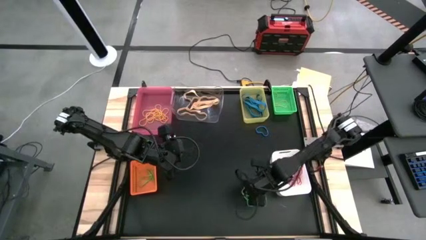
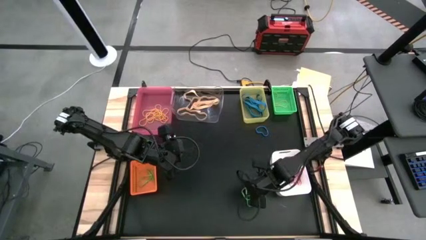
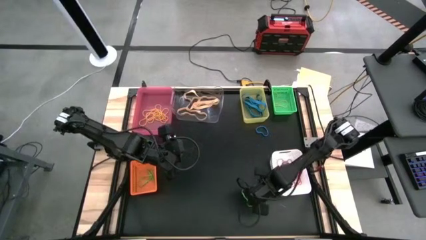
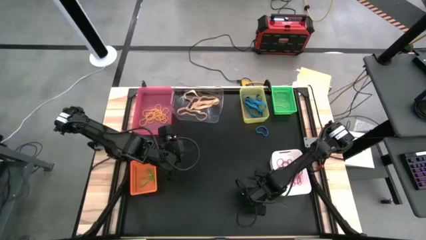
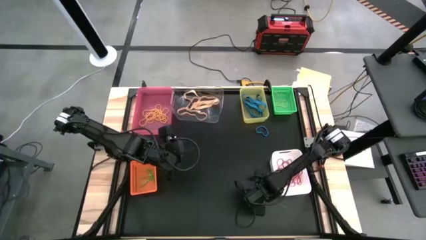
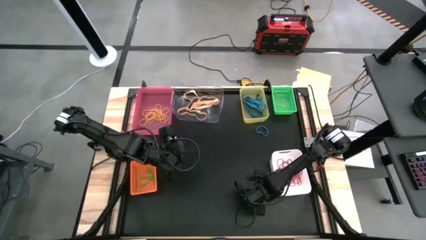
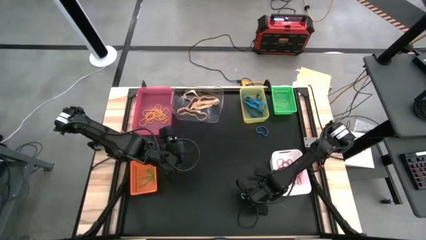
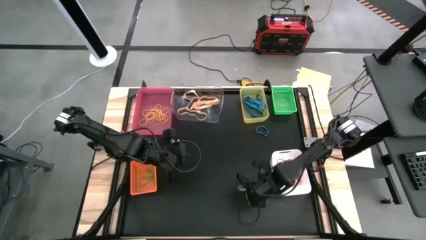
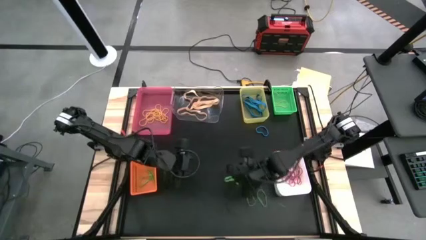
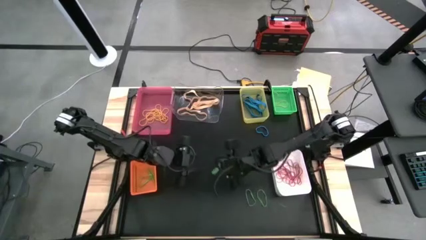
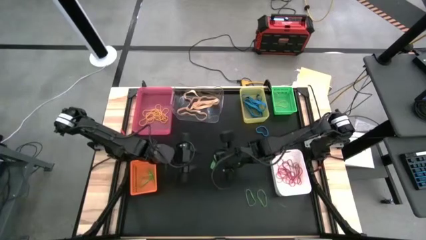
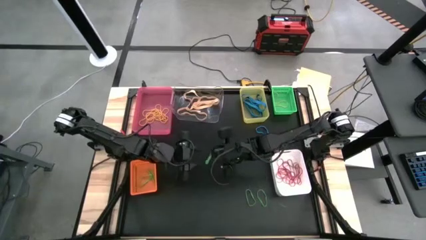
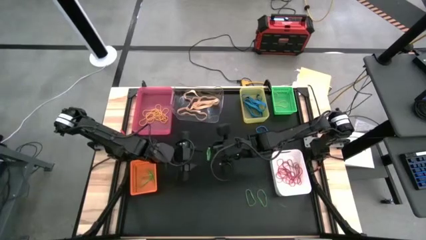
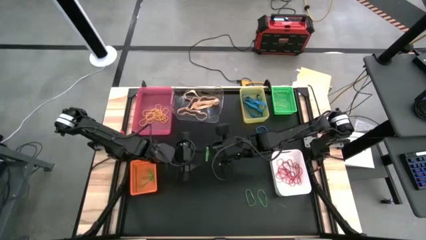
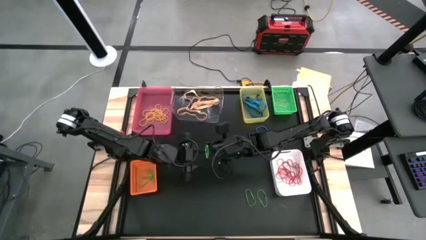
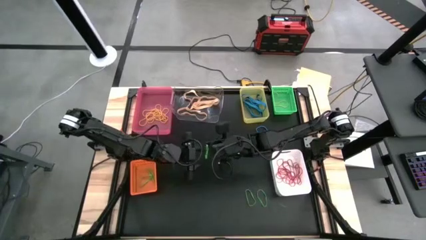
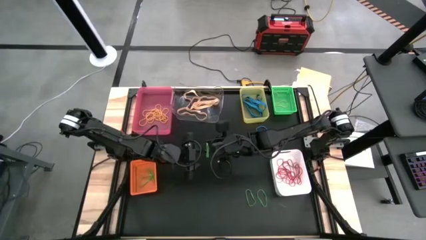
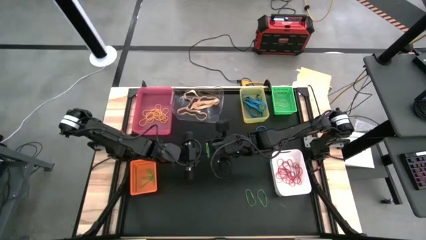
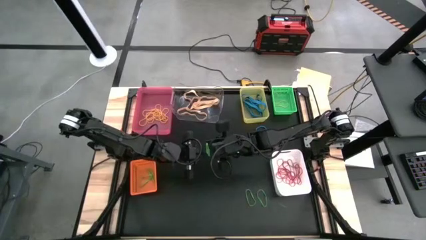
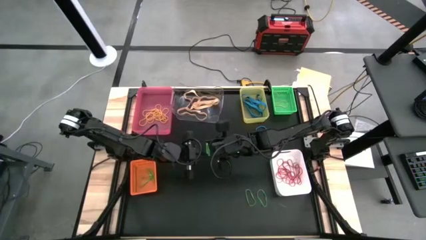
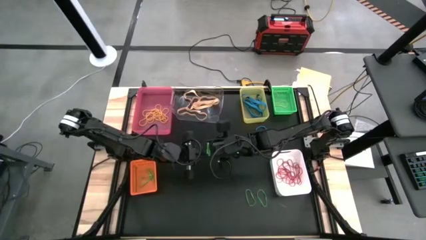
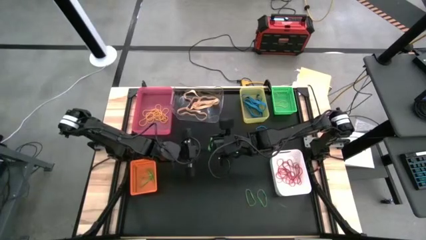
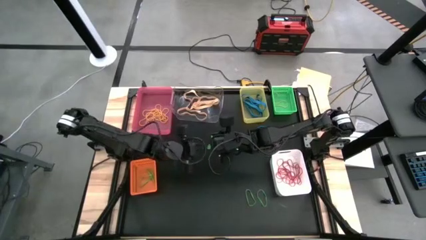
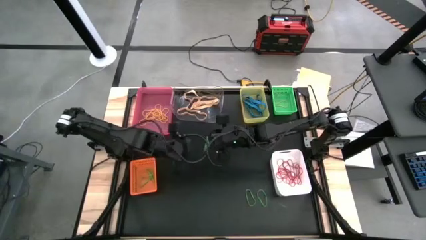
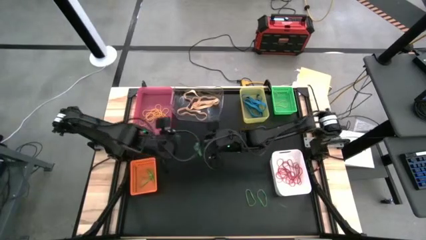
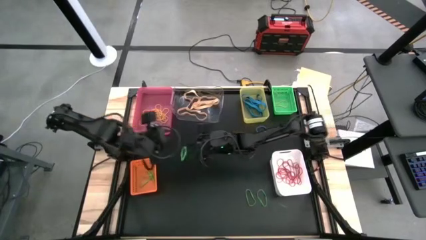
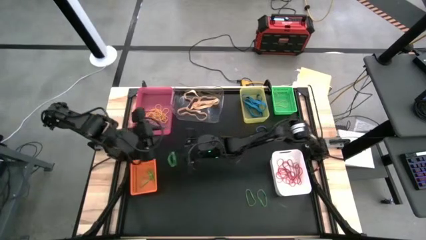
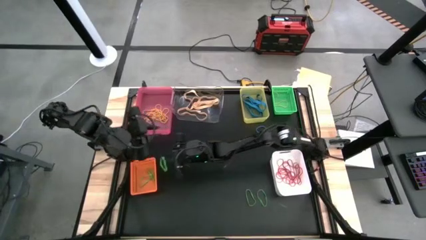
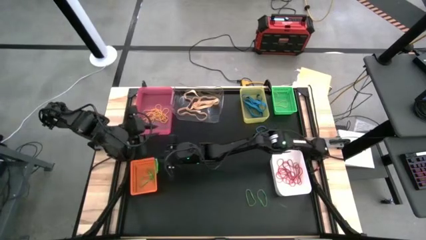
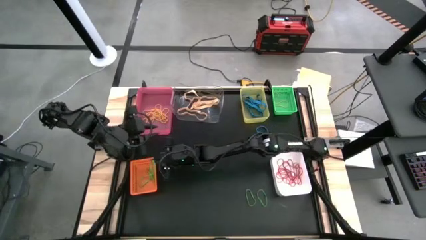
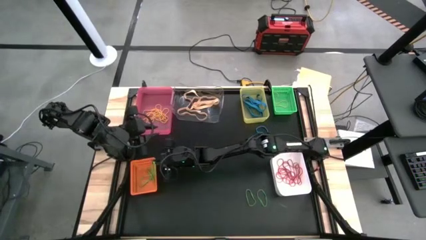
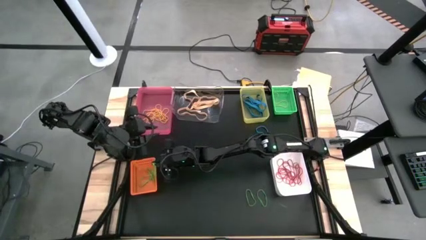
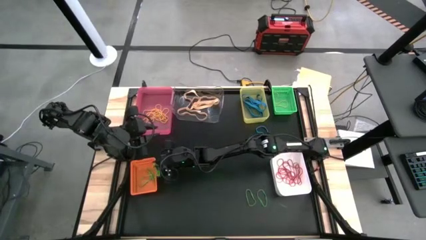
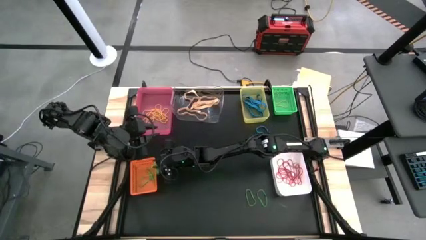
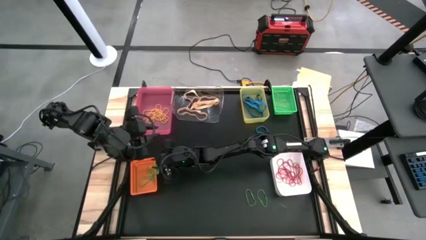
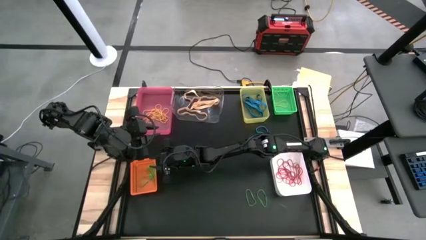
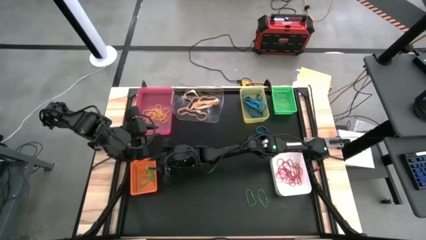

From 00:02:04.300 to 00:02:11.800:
Task: Sort rubber bands into baskets
Put the green rubber band into the orange bin

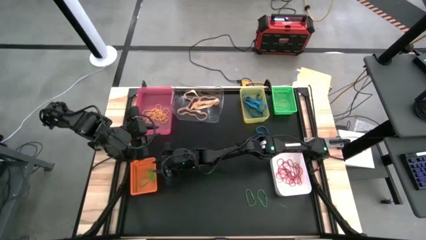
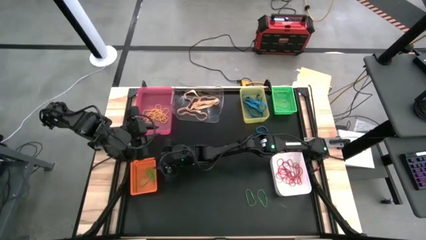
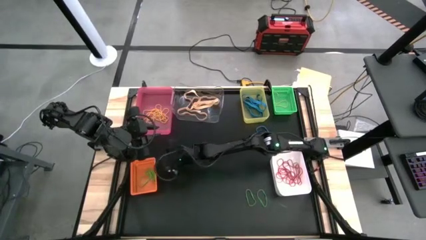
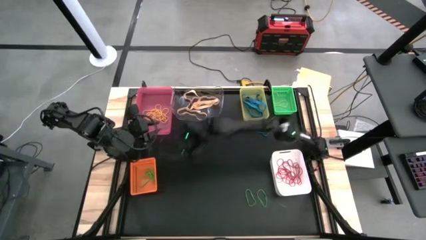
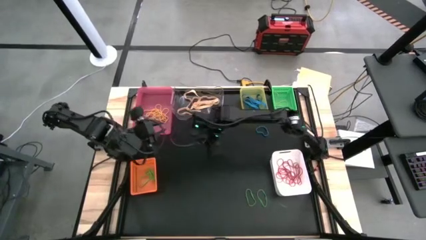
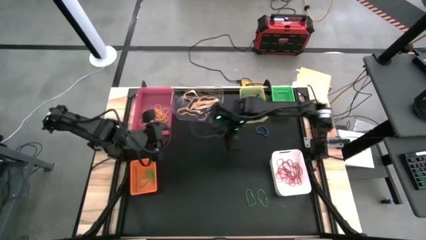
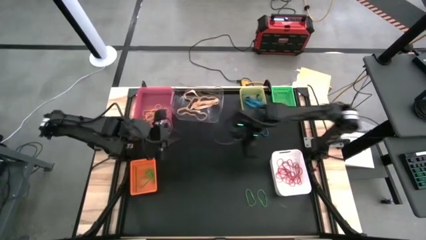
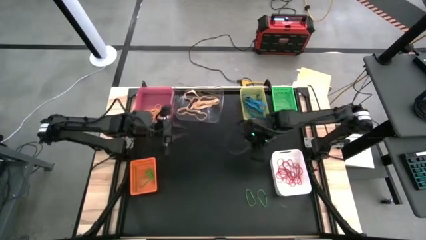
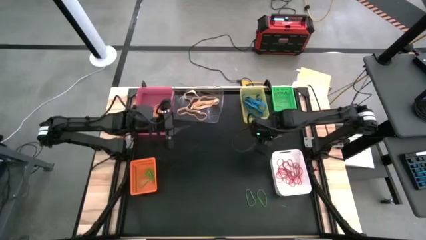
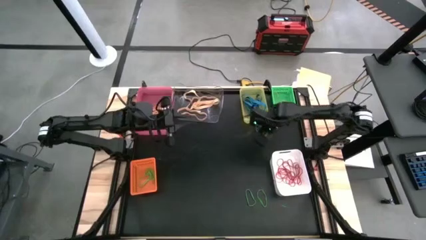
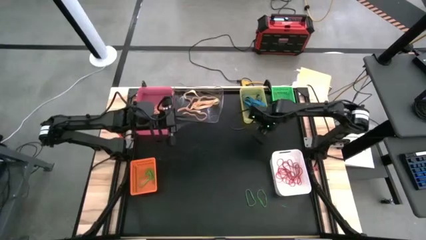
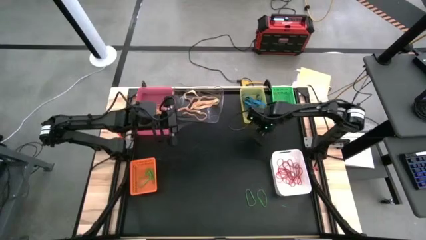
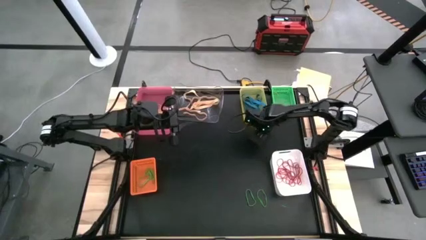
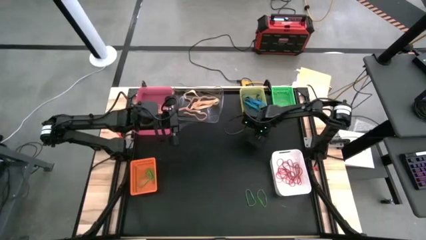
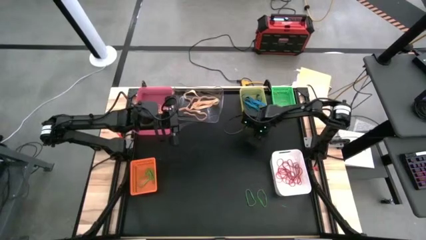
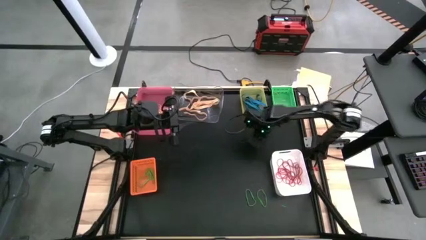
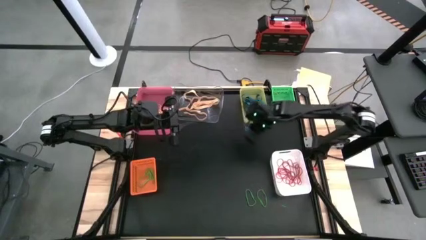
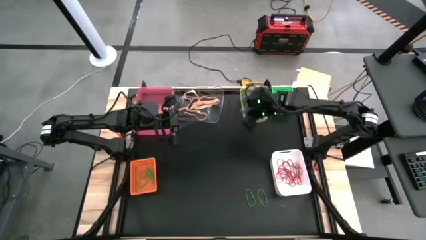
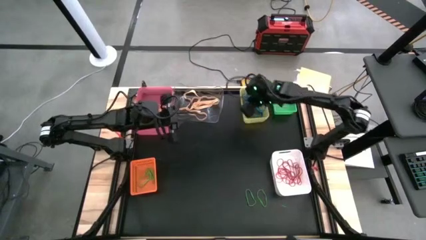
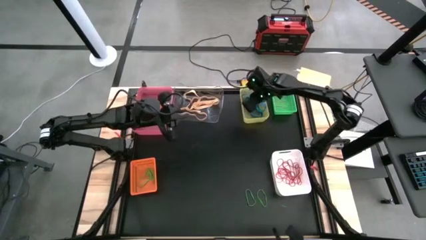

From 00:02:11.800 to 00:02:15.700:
Put the blue rubber band into the yellow bin

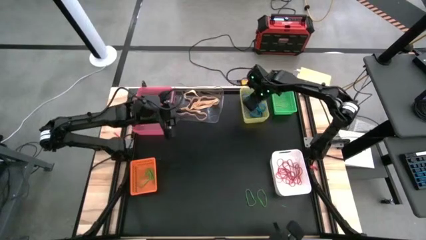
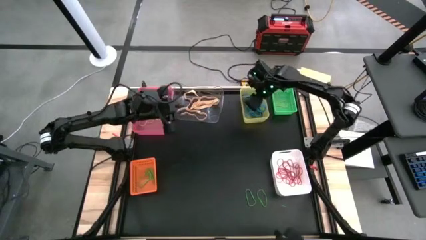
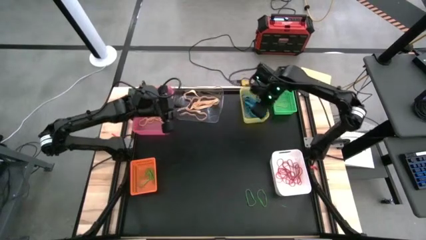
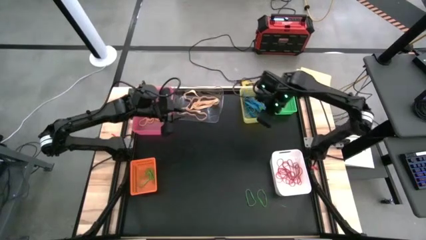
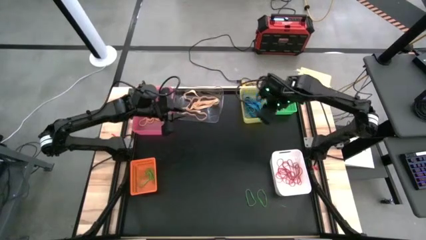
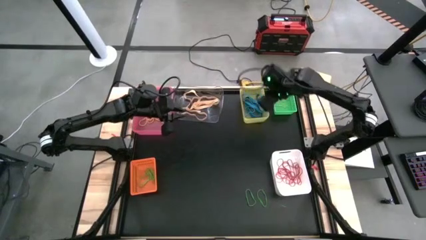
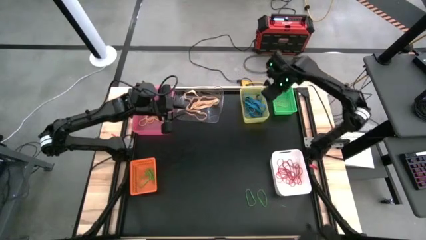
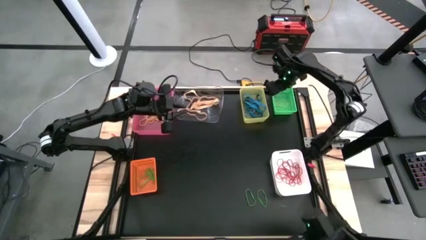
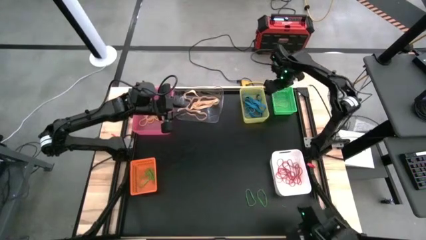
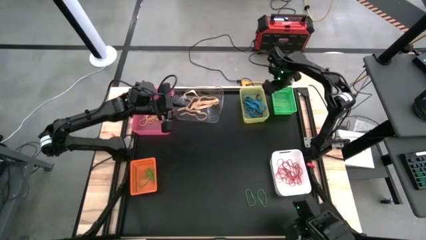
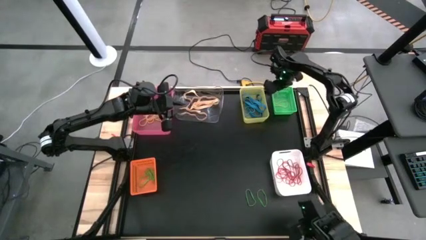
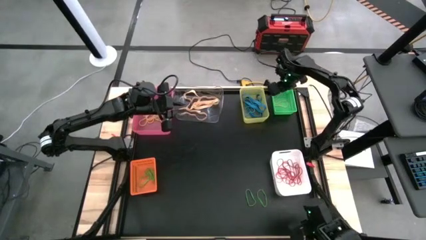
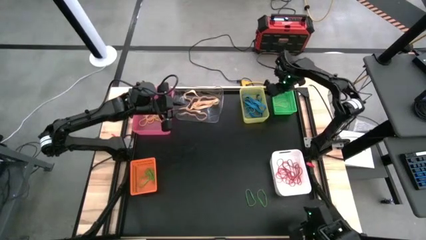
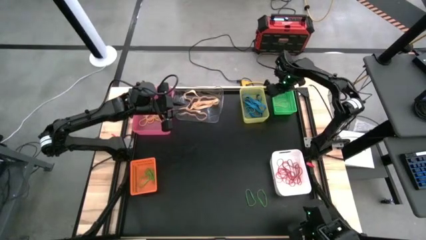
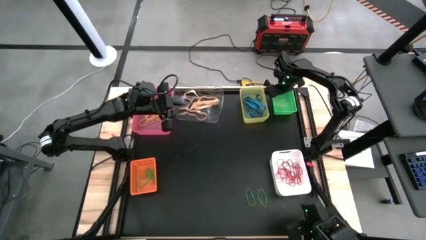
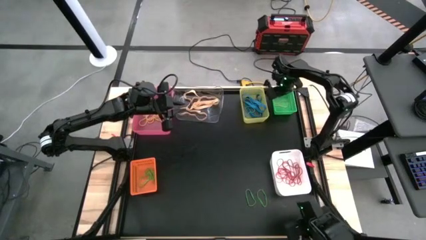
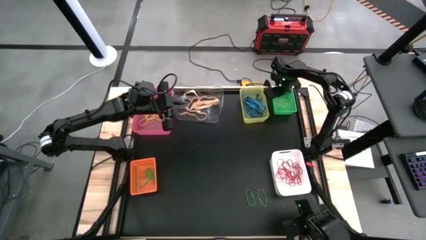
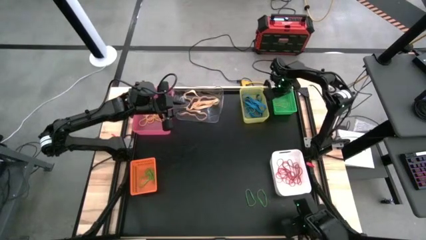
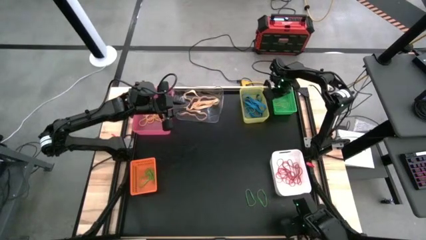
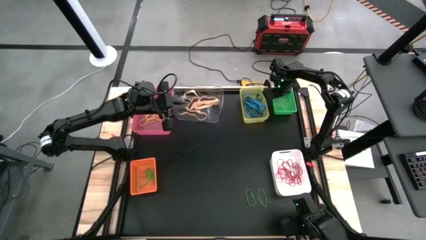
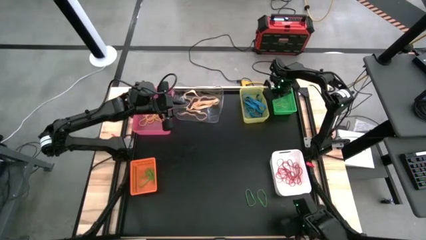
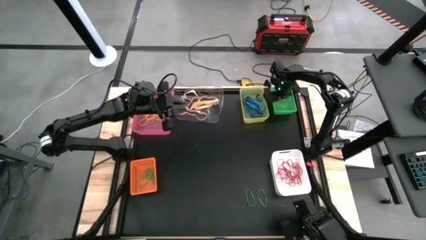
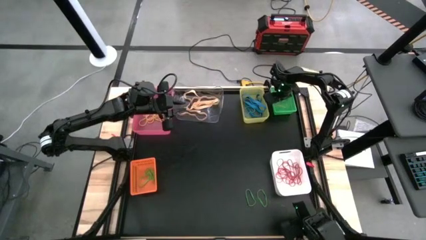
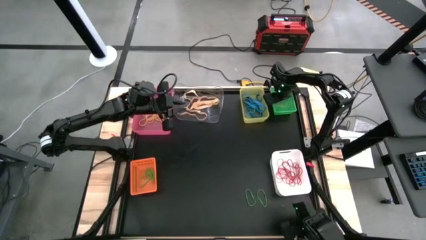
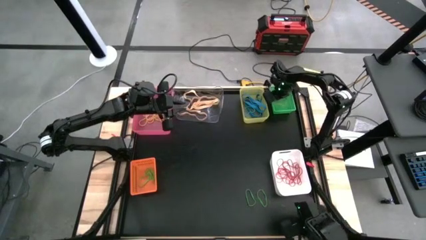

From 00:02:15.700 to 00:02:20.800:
Put the yellow rubber band from the green bin to the pink bin
